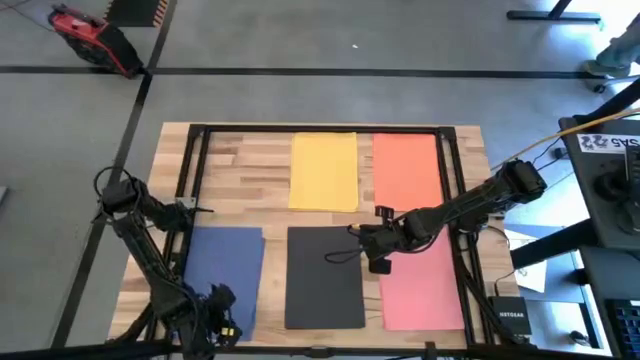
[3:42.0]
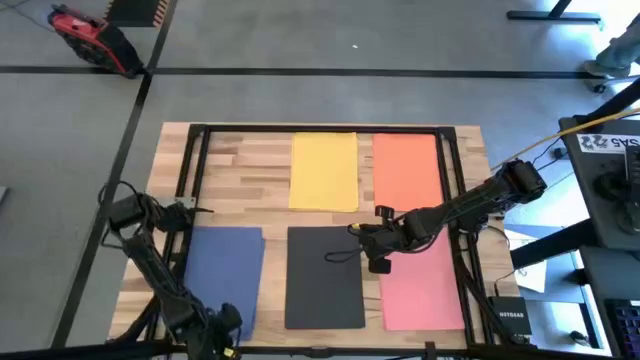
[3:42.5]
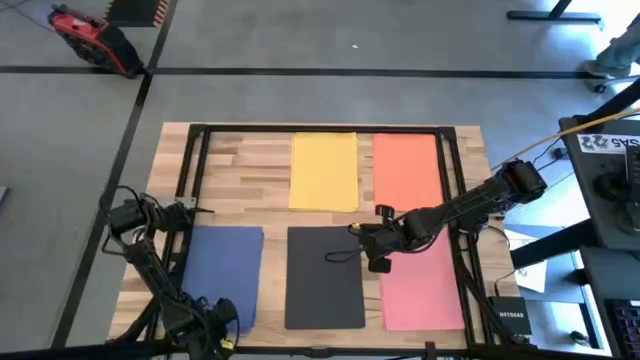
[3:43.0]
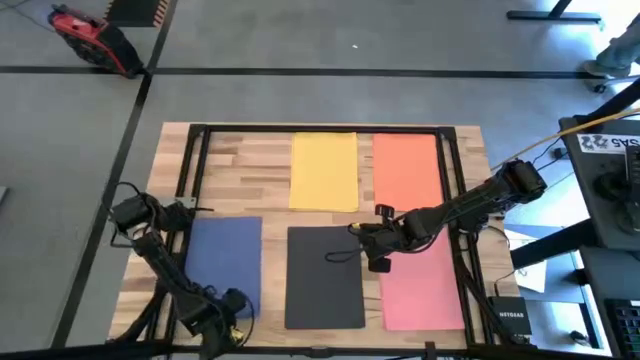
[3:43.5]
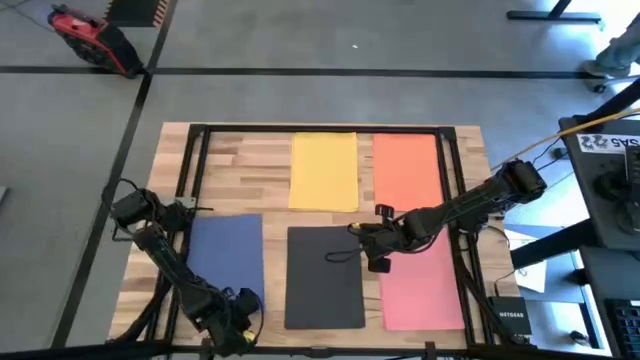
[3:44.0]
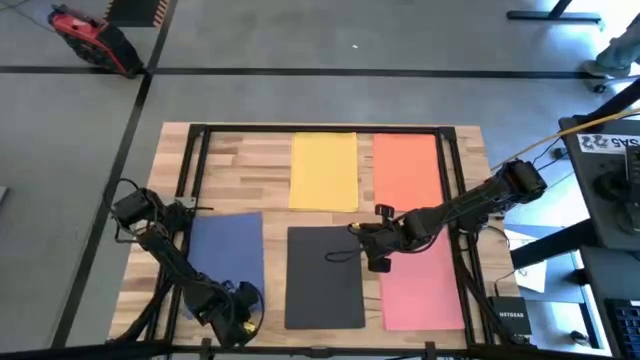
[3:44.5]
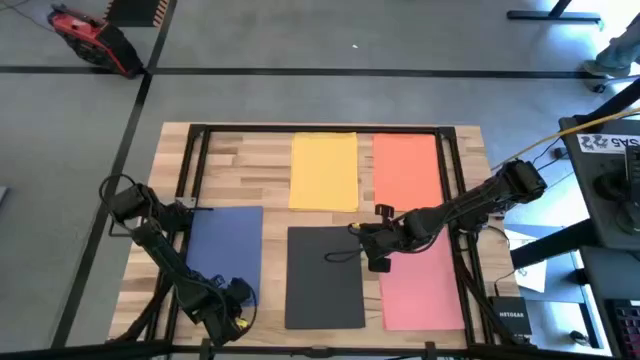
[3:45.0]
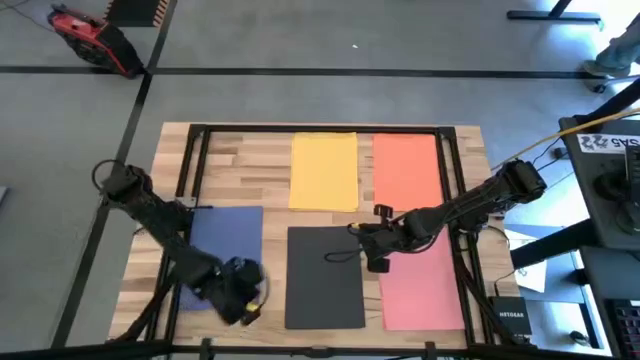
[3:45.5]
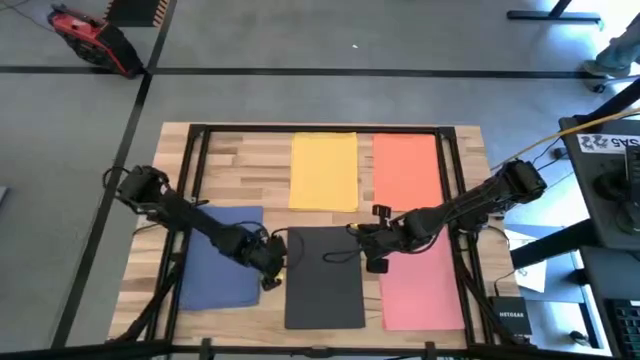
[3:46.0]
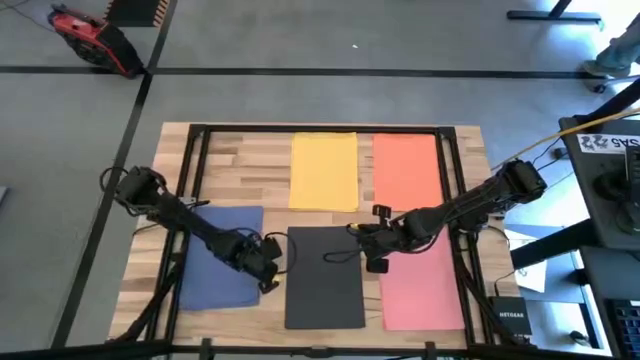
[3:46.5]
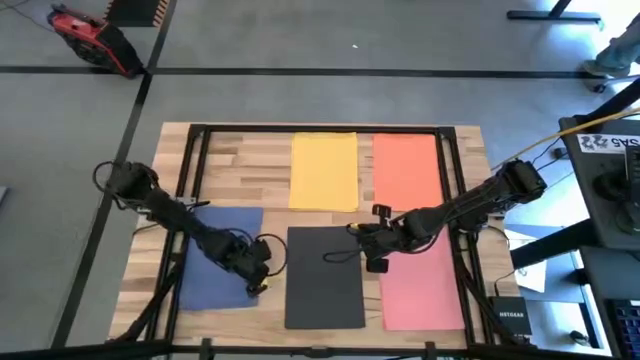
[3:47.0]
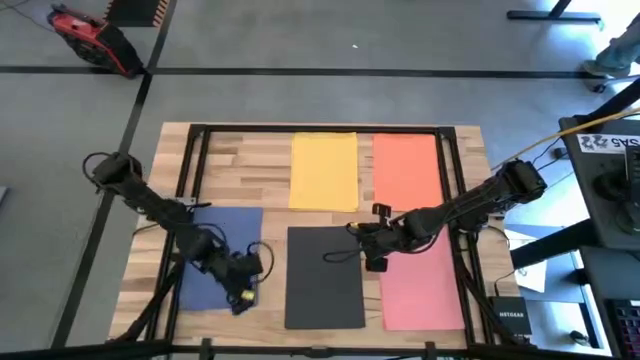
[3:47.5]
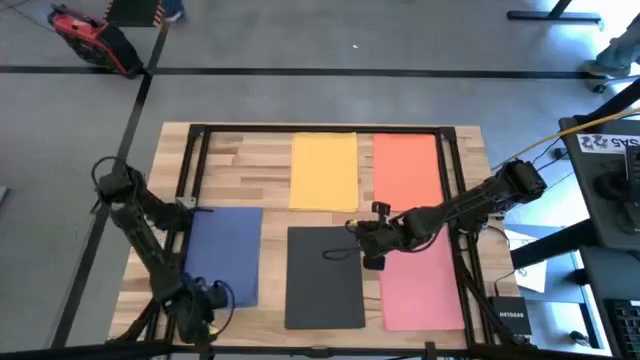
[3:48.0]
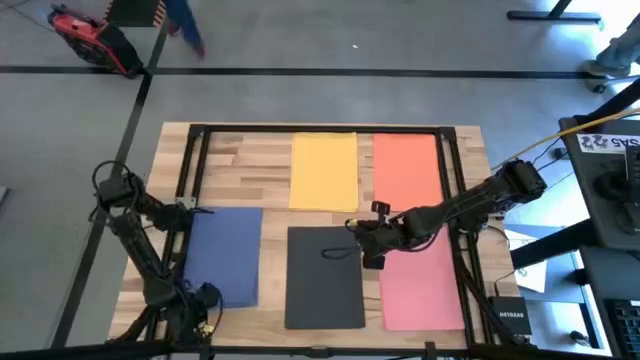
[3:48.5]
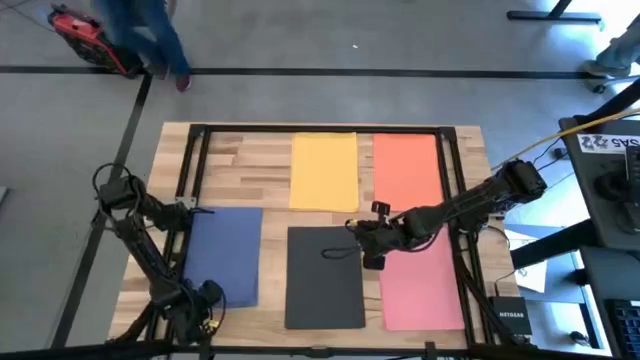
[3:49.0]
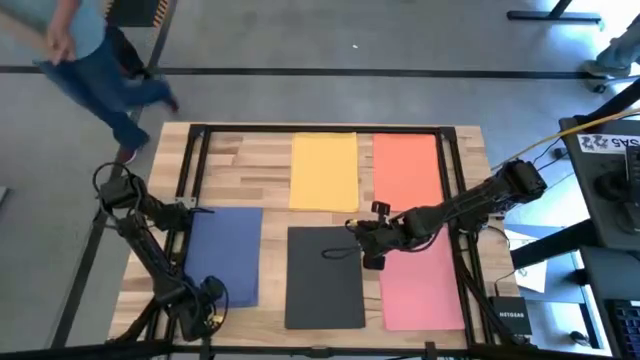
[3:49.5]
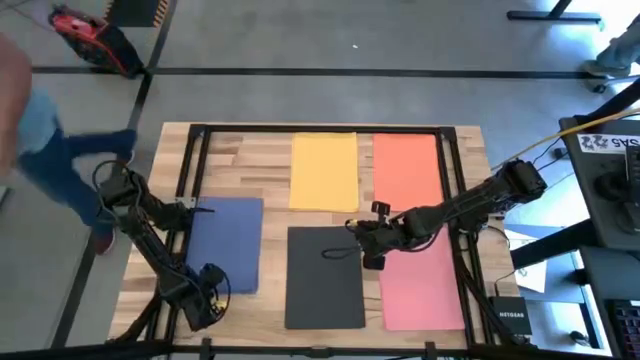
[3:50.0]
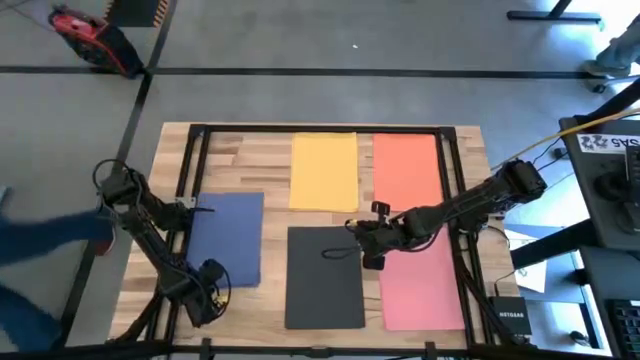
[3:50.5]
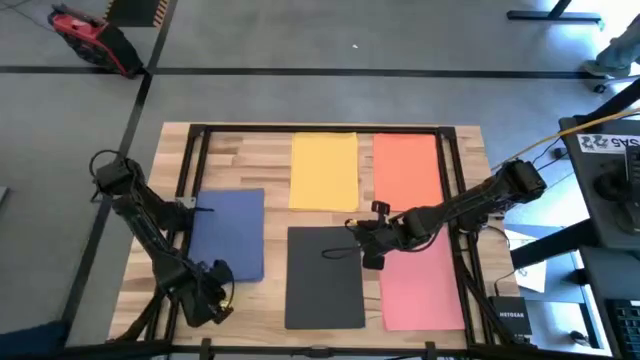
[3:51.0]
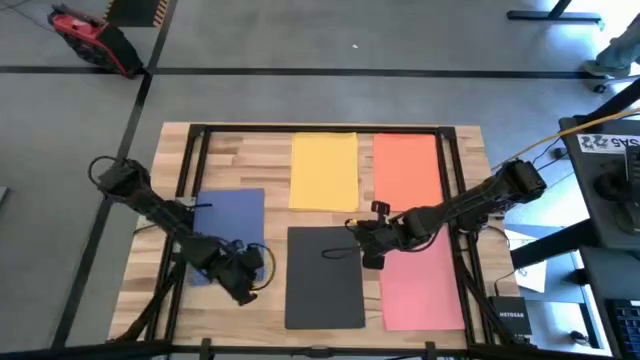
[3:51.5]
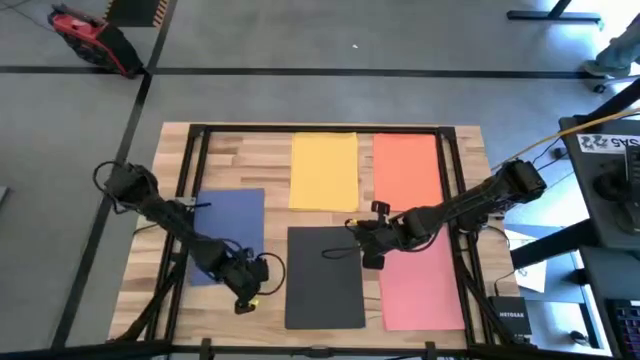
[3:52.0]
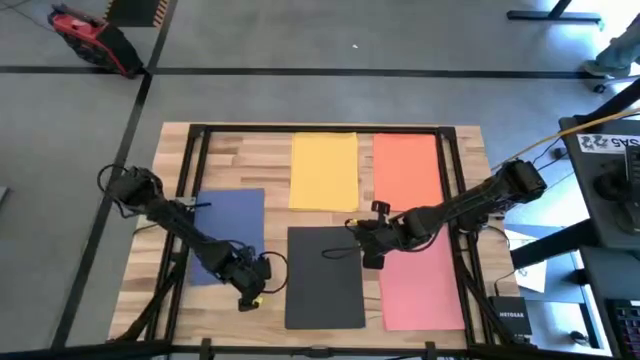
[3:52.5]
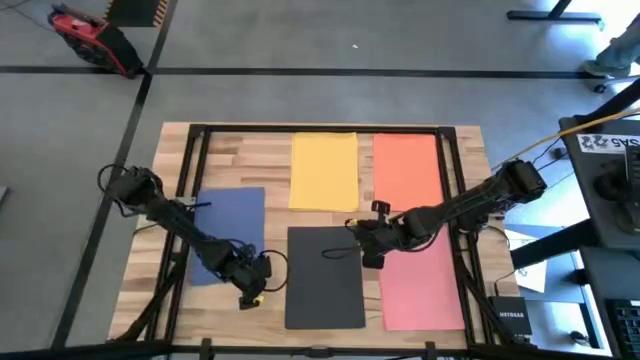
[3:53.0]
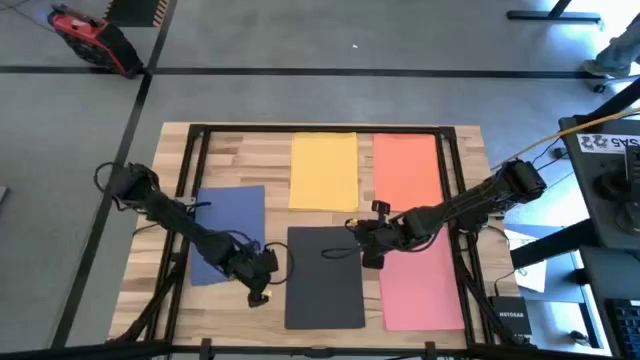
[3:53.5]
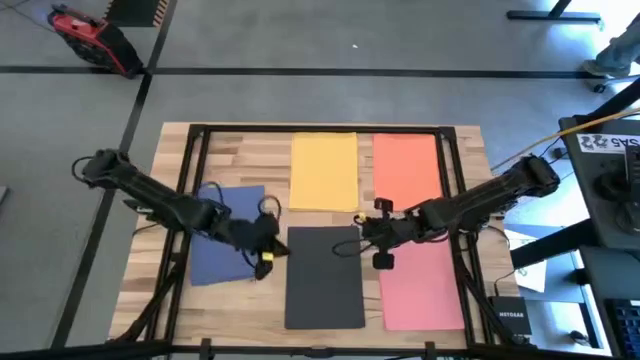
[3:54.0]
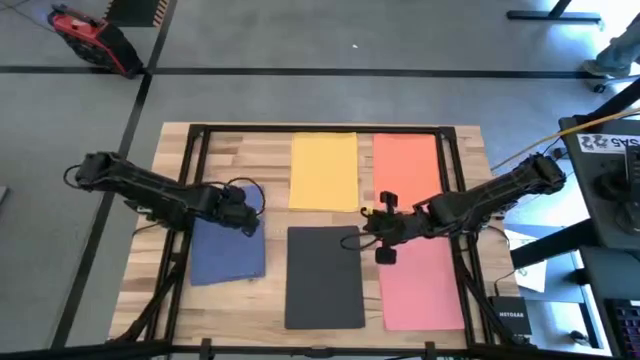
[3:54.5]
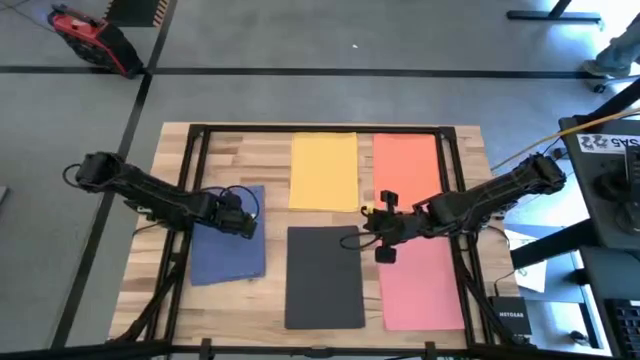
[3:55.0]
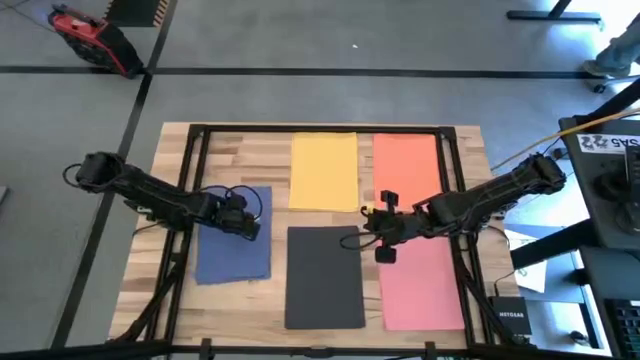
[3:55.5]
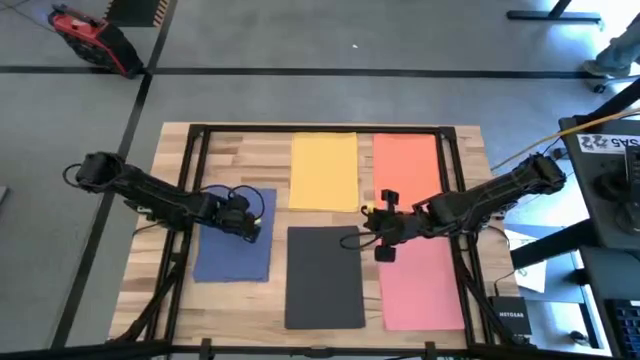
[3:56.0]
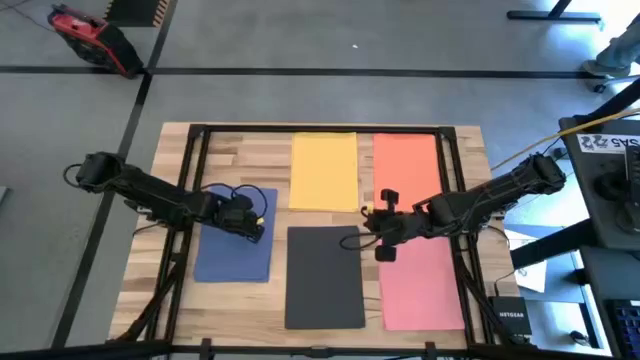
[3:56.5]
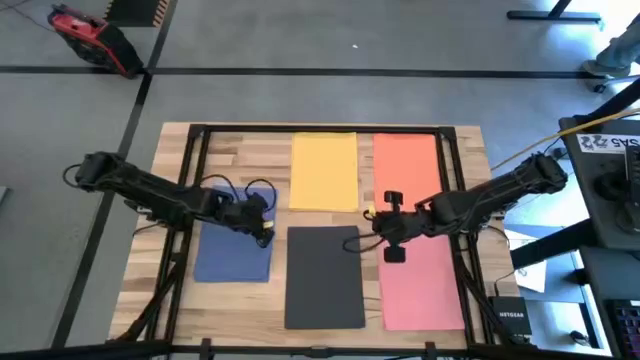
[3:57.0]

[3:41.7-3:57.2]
Task: Organize paper
Adjust the stacked blue colored papers

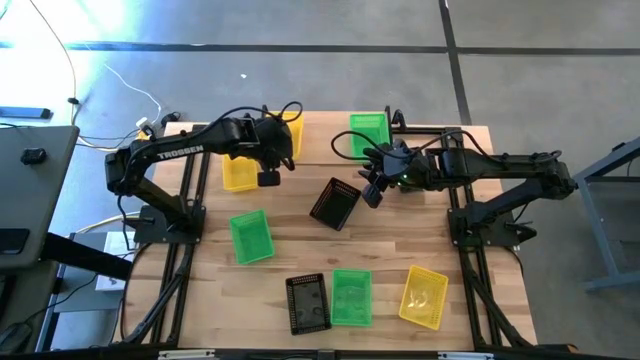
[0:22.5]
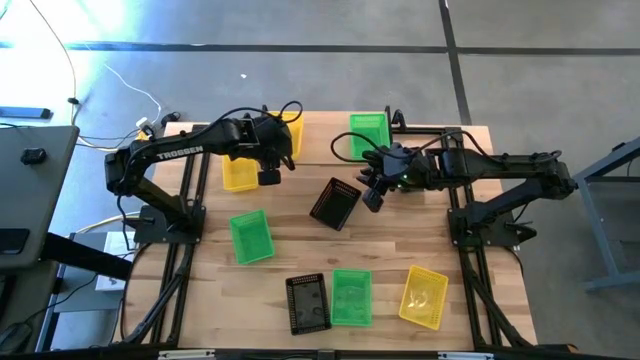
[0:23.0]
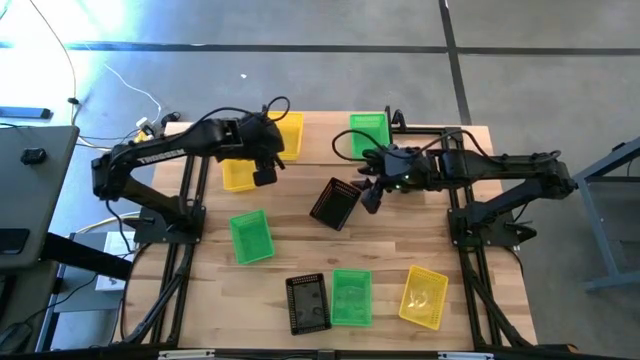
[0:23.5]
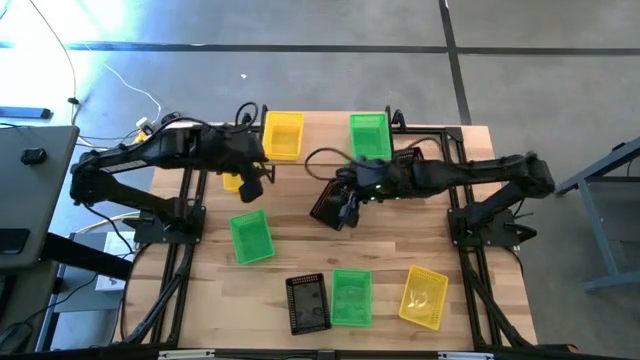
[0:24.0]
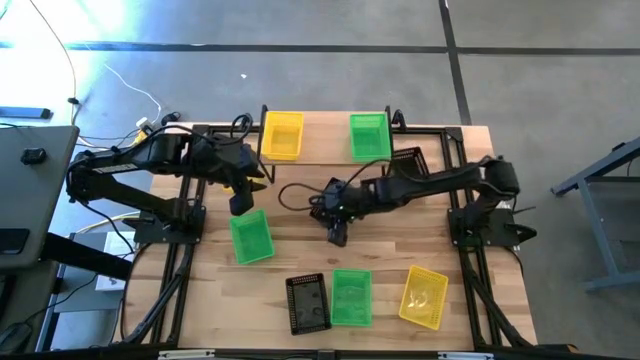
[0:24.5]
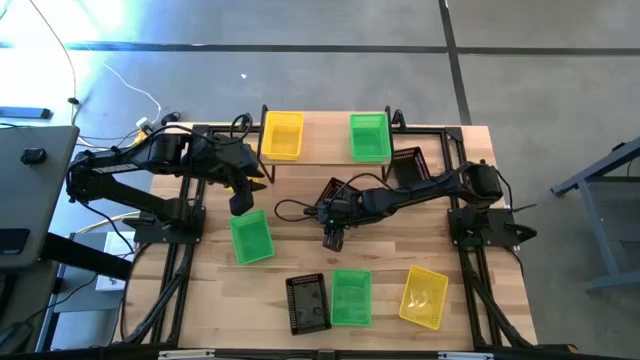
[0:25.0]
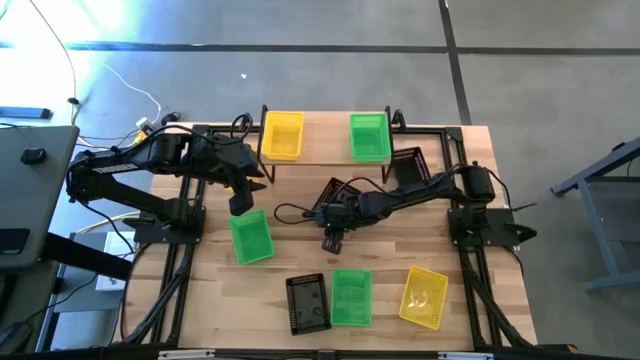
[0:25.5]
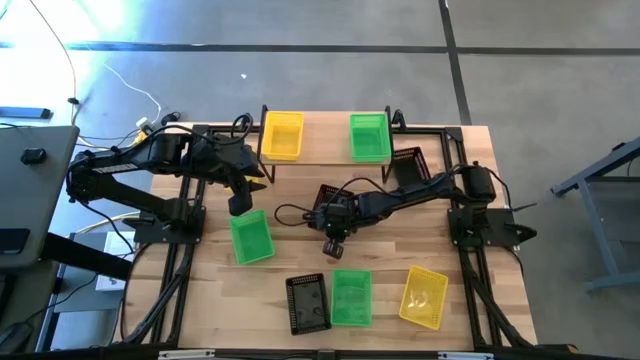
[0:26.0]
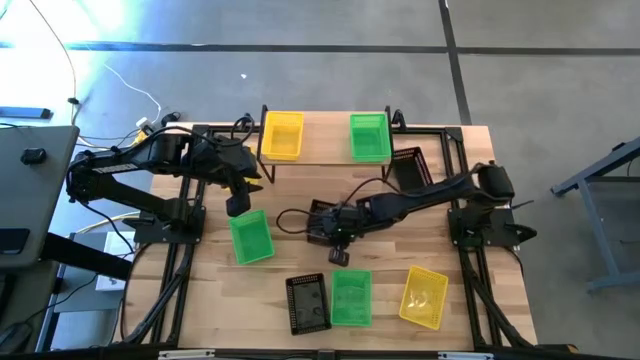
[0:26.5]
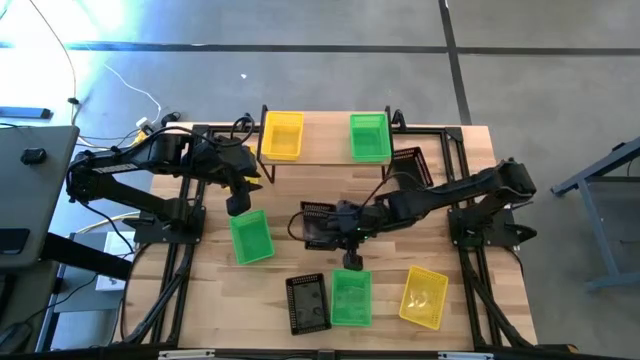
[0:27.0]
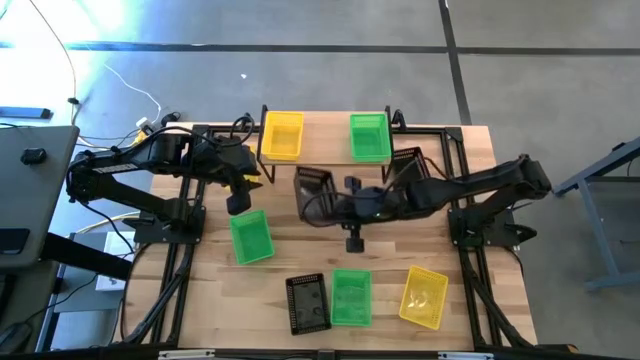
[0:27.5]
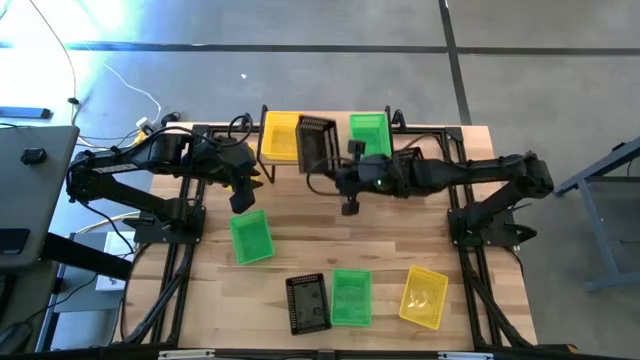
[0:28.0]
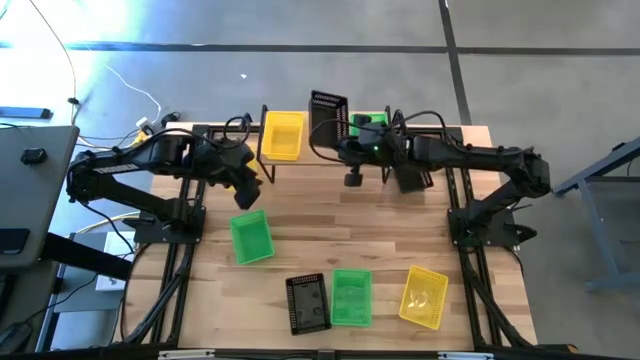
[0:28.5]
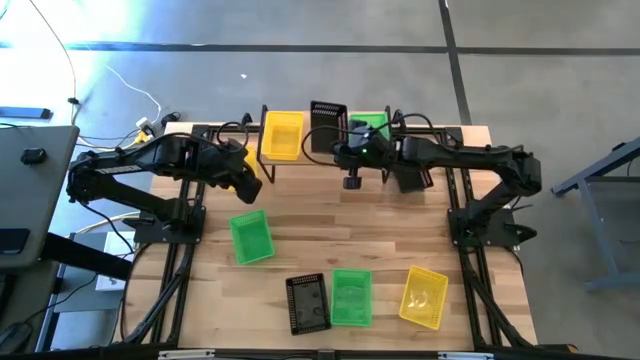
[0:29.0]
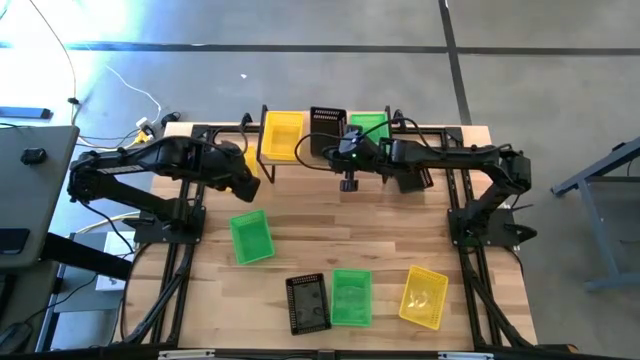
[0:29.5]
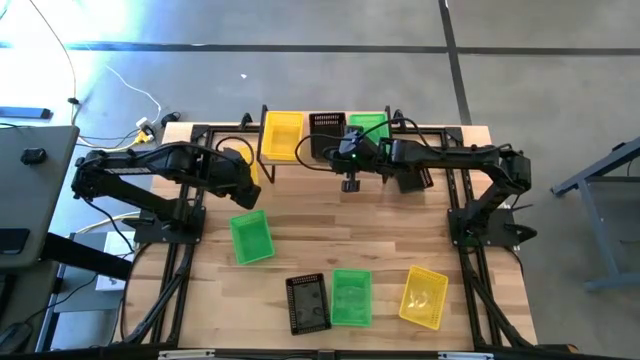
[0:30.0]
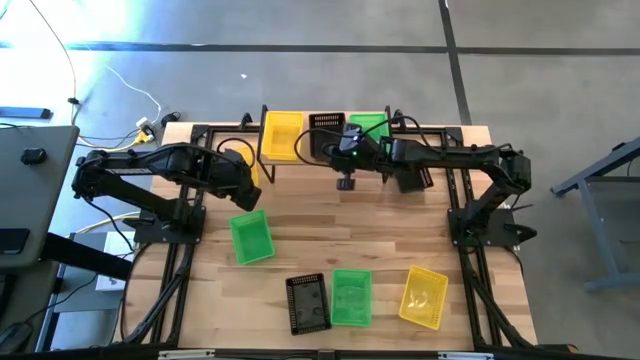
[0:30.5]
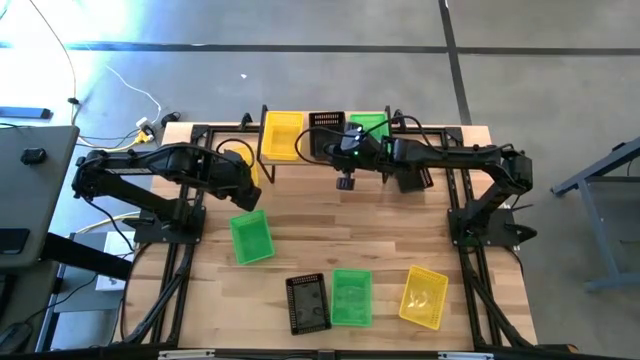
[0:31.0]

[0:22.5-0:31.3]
Task: Stack baskets on shelf by color
Put the top left black bin on the shelf
